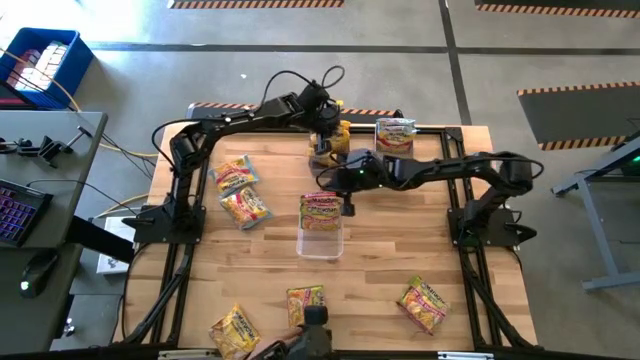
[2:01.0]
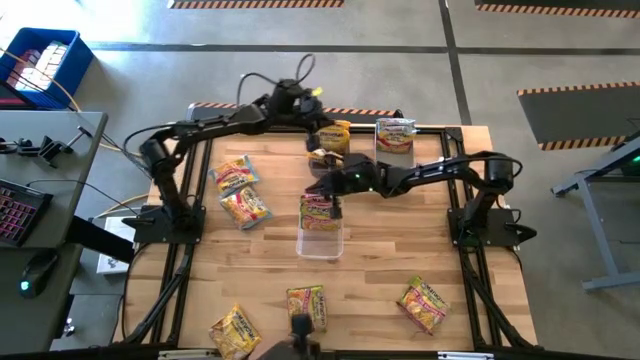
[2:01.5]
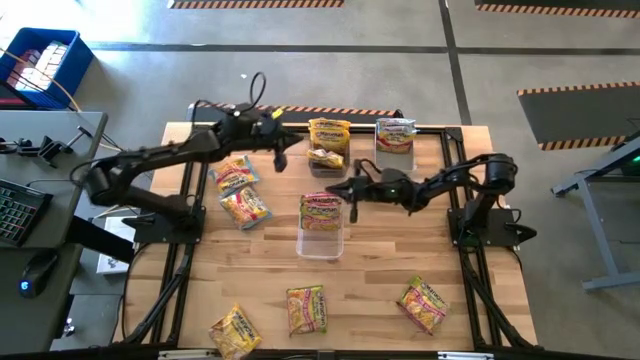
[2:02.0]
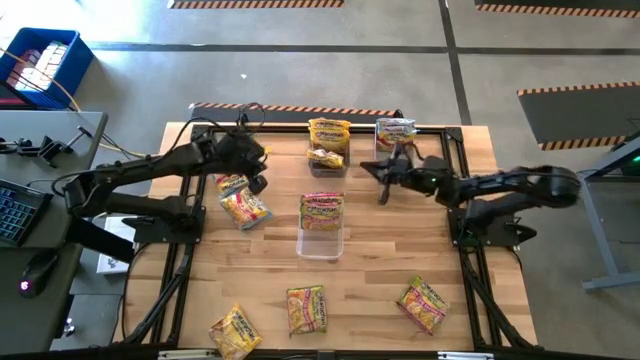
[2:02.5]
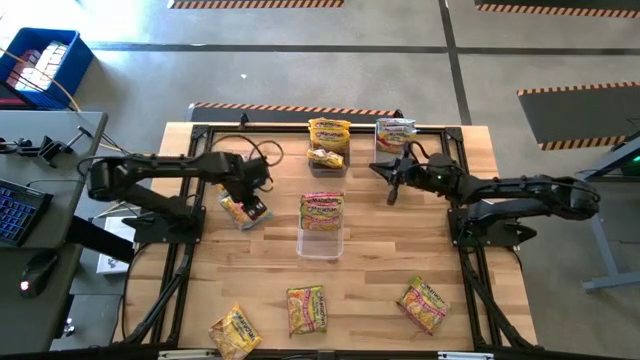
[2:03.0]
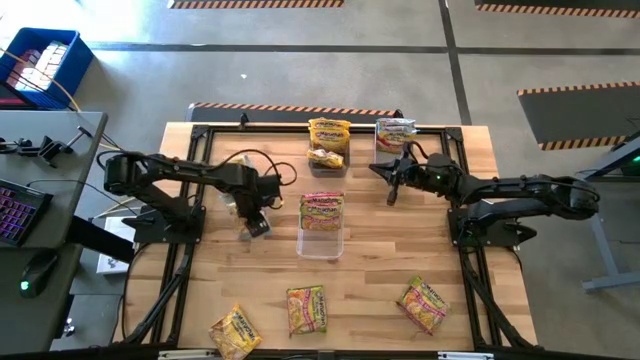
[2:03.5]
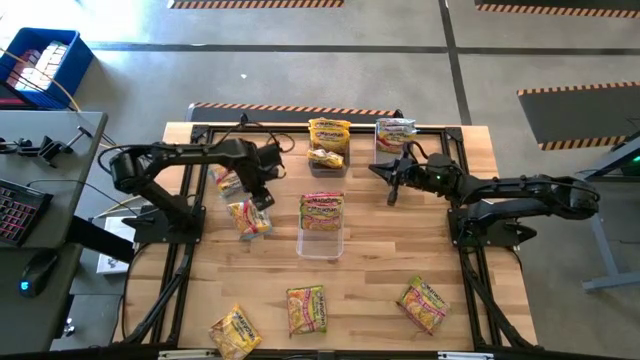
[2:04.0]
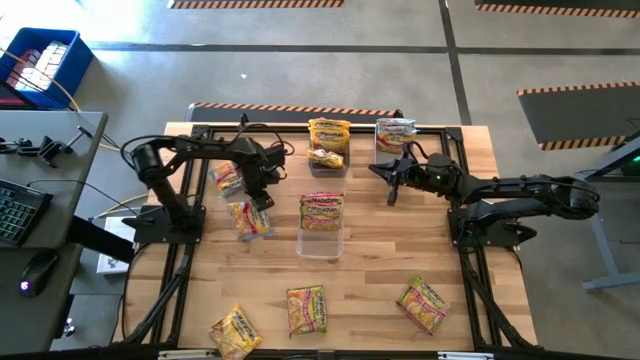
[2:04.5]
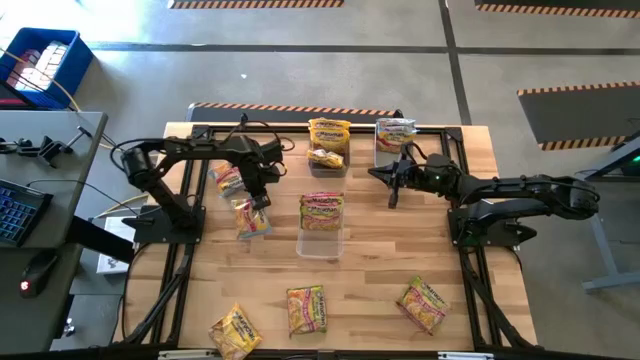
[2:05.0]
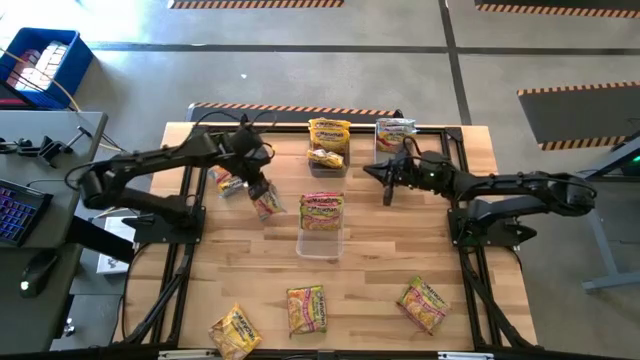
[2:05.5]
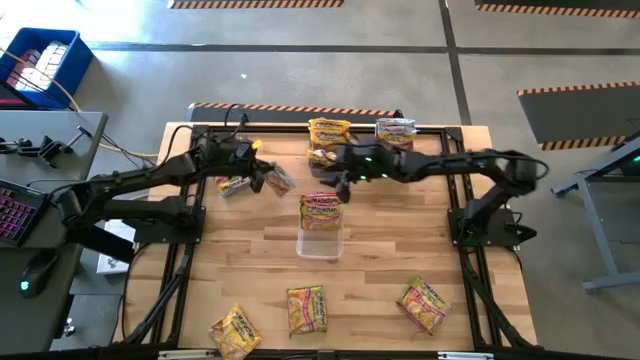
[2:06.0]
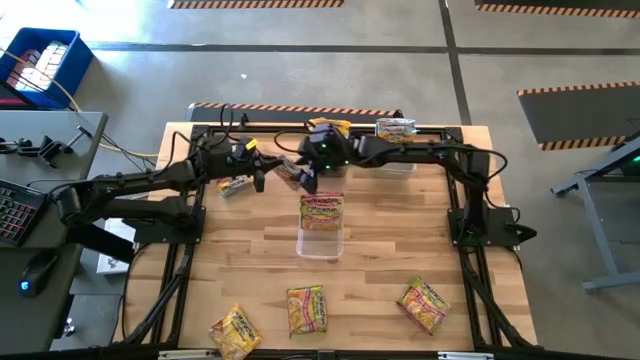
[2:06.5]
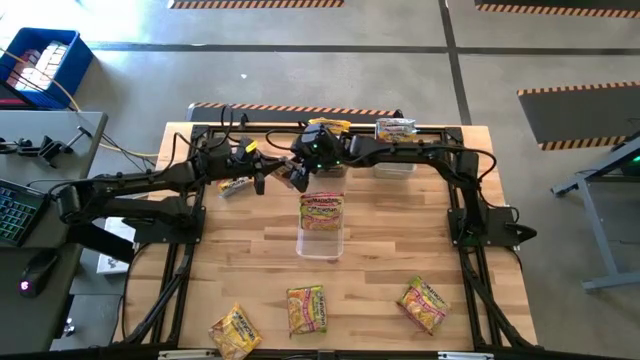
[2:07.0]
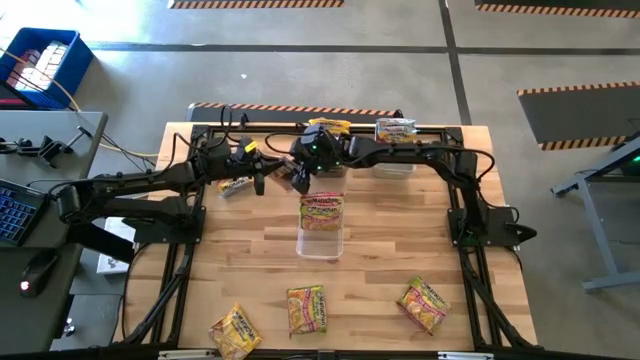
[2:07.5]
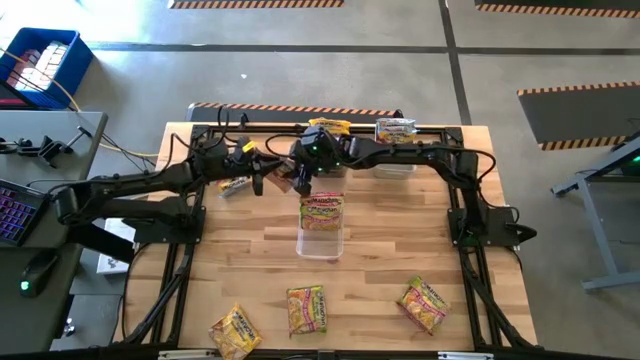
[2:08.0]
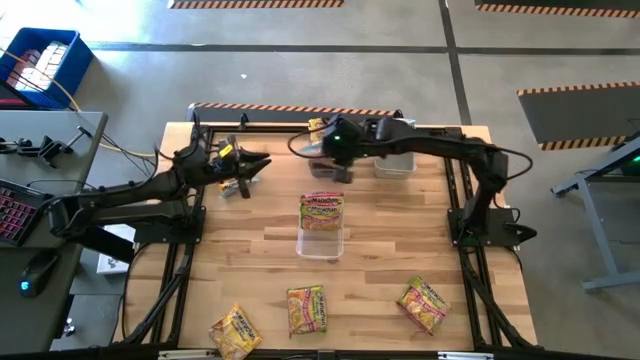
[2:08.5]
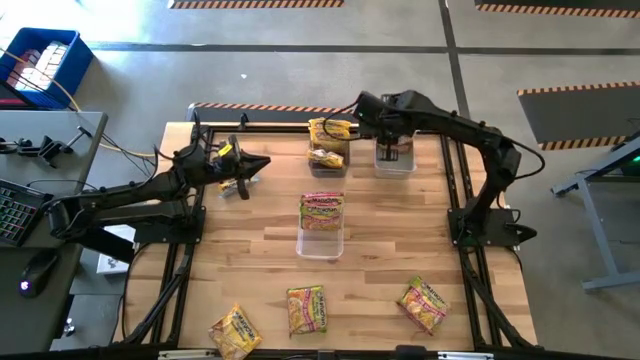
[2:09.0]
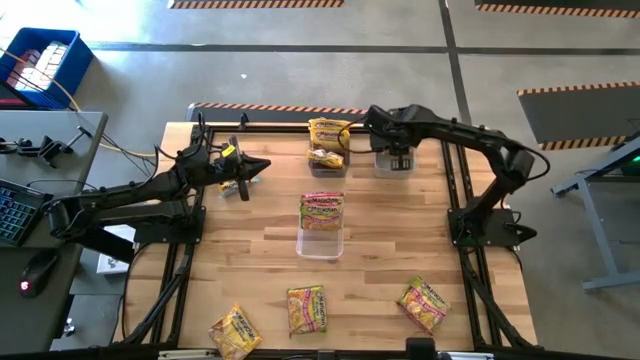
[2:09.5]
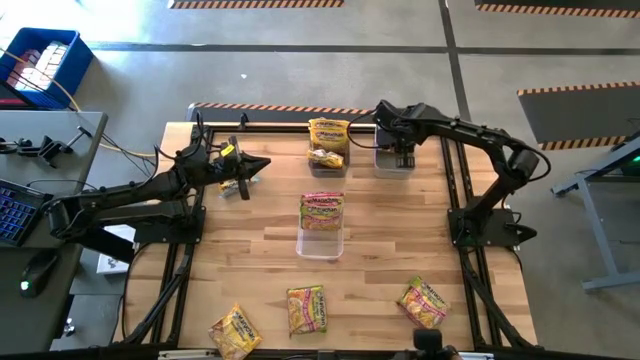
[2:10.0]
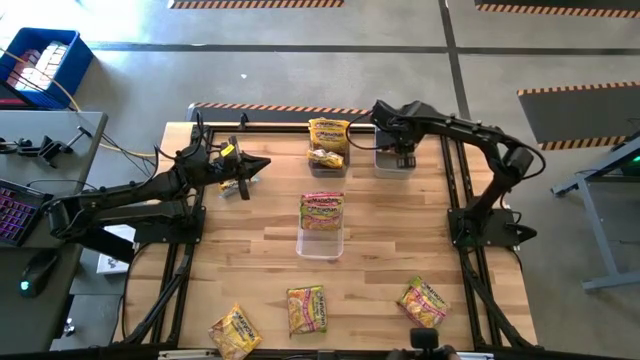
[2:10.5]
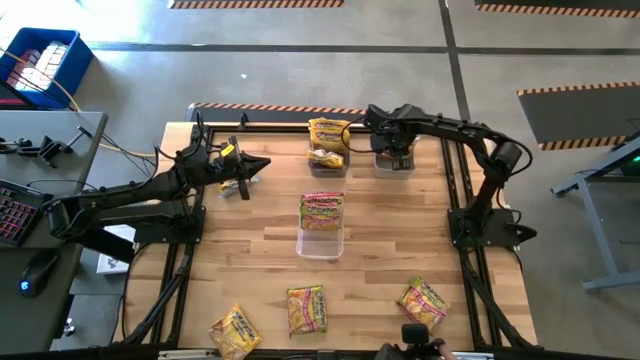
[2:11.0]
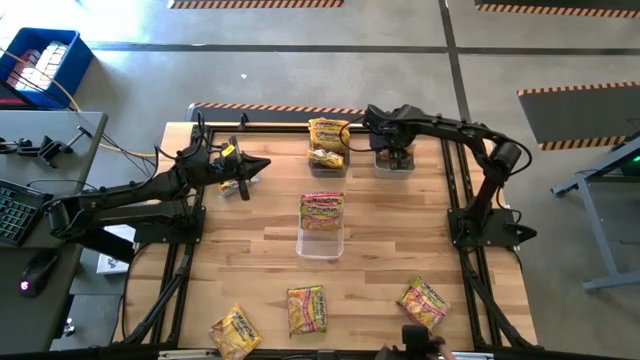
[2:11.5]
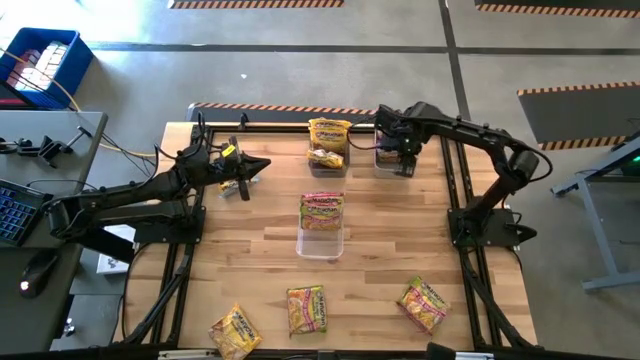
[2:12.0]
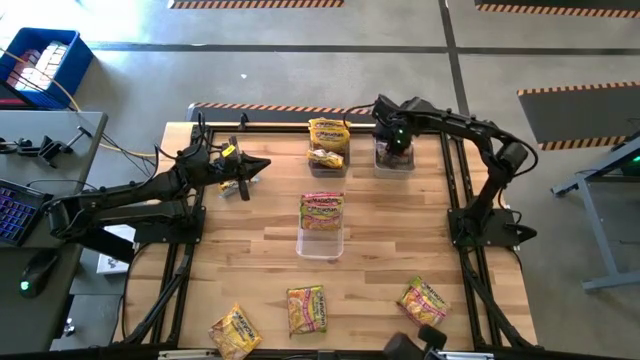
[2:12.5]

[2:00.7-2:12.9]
Task: Sort Maruchan noodles
Put the blue noodle pack into the white bin

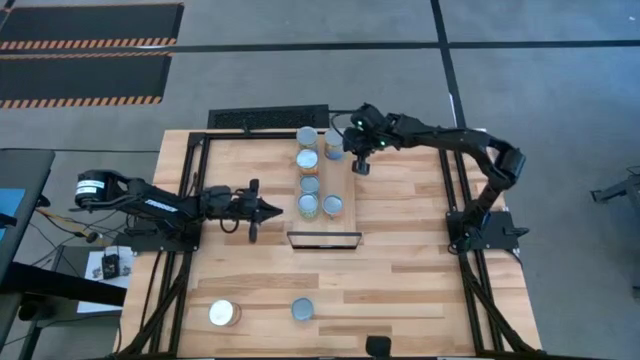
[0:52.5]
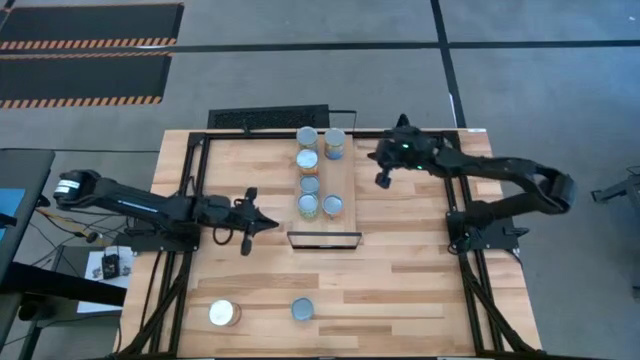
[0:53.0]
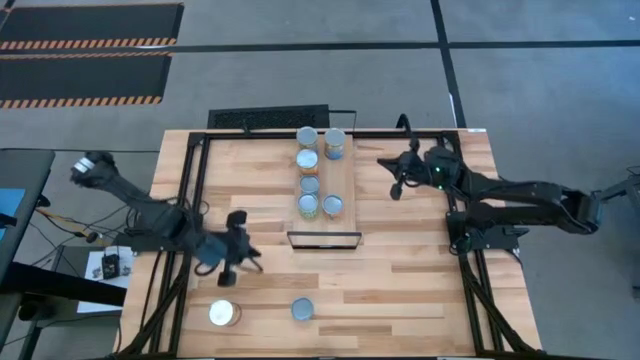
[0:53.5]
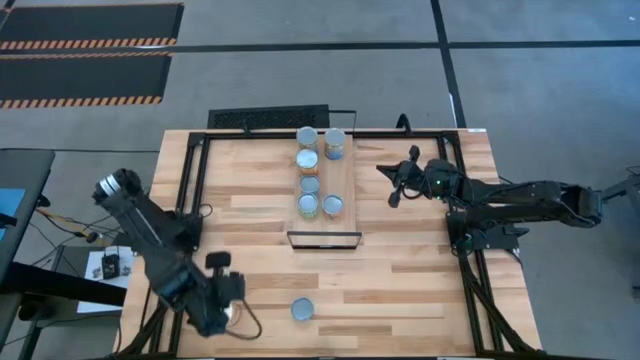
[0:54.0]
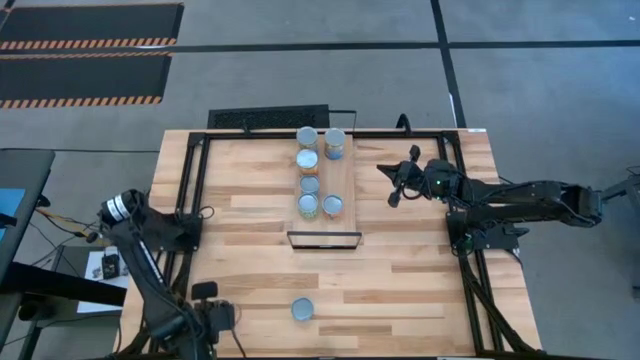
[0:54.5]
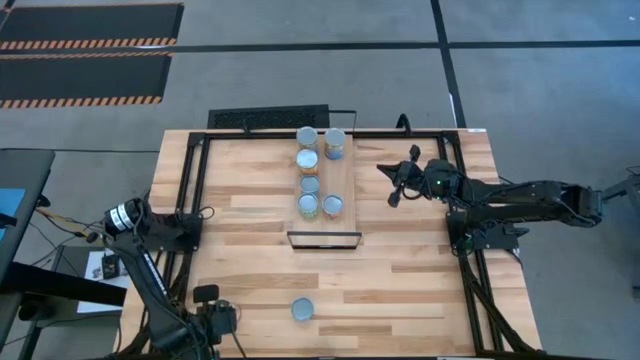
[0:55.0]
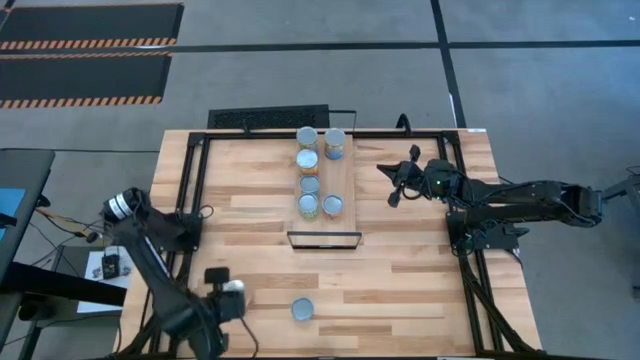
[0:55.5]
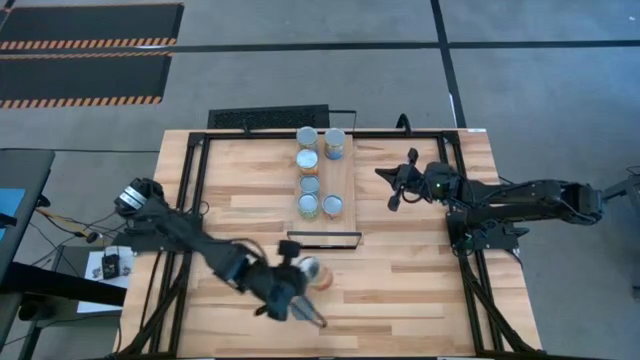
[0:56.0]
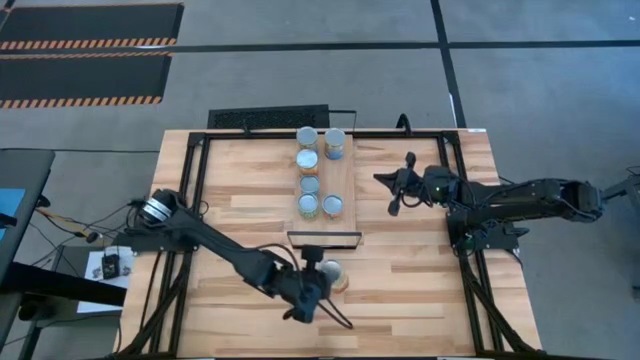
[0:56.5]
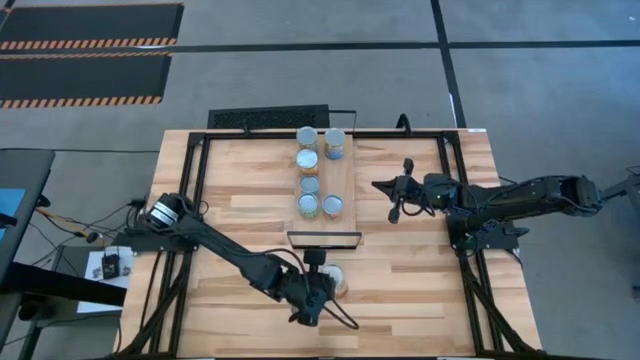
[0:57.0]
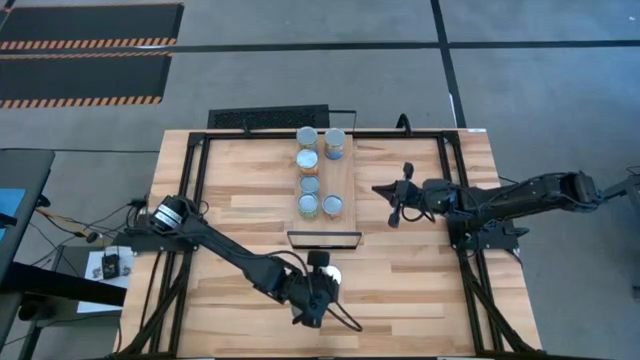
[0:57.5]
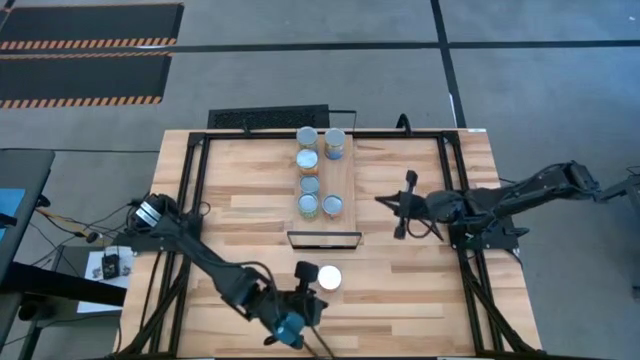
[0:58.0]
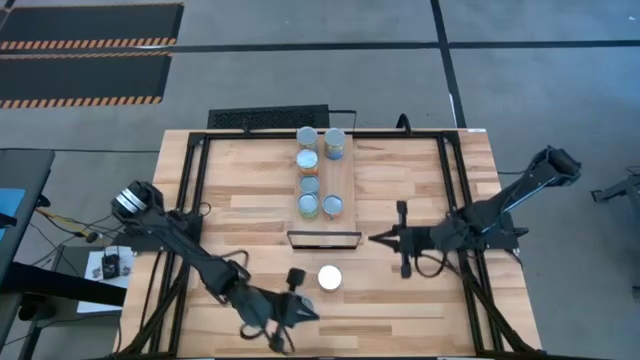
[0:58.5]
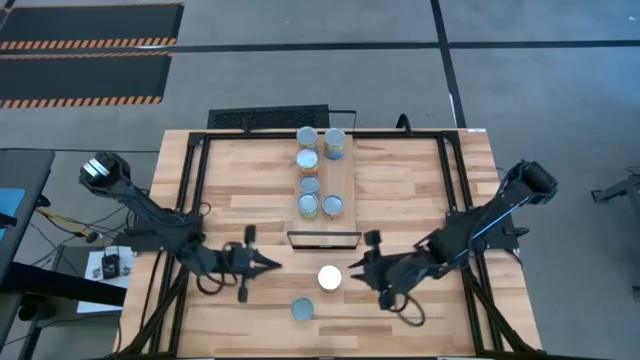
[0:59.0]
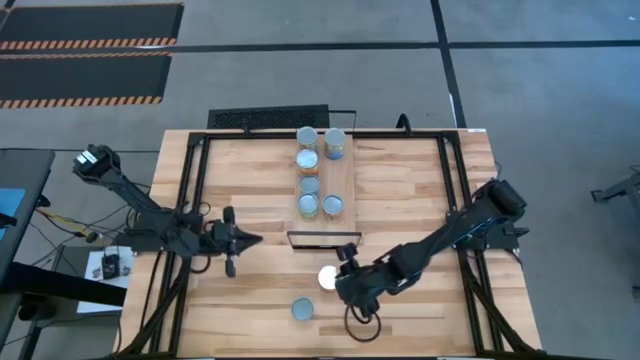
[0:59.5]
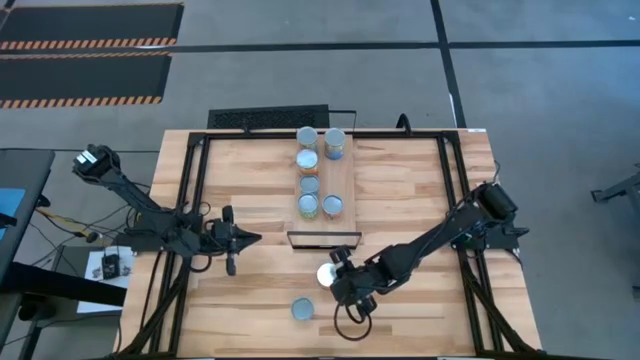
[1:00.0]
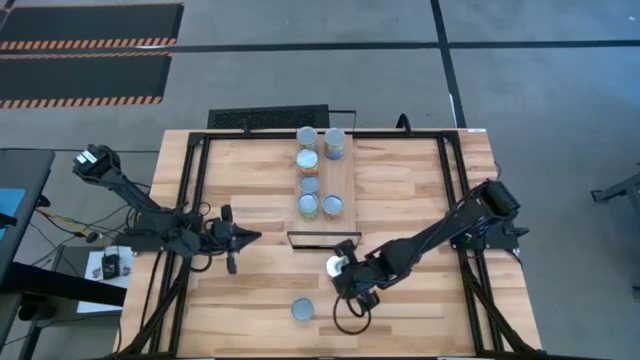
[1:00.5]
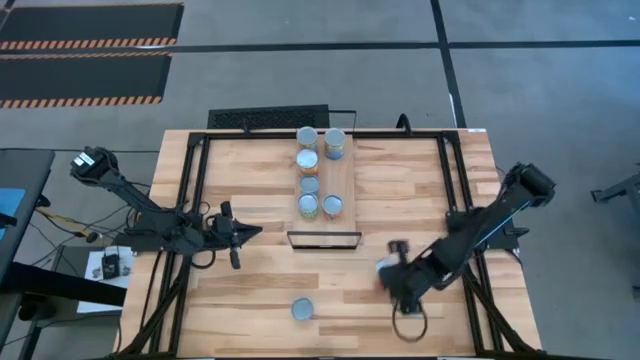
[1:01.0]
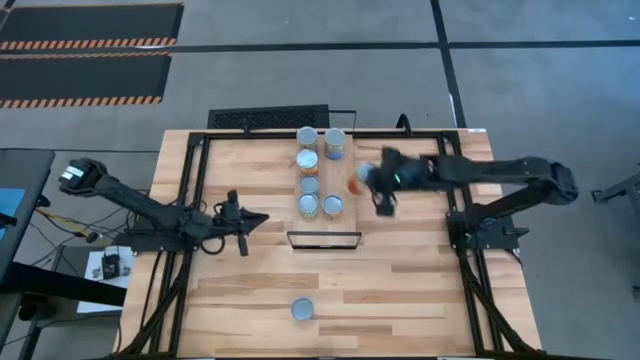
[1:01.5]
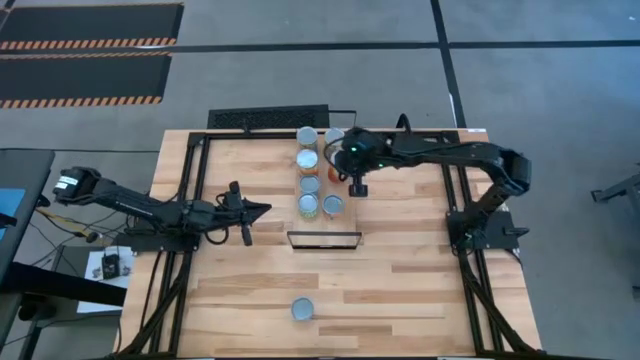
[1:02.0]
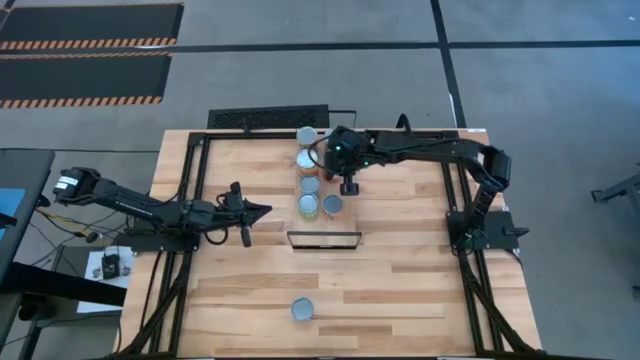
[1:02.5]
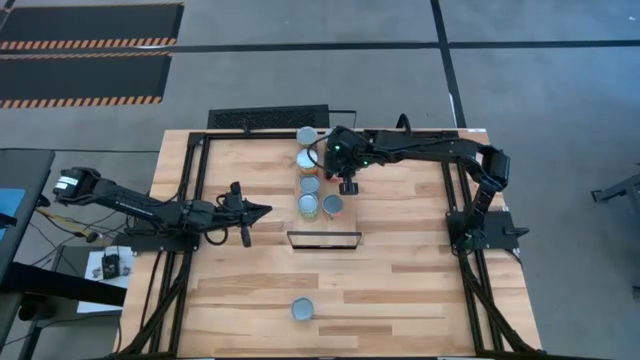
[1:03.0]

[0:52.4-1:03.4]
Task: Pick and place cans onto a shelf
Put the canned corn on the shelf aligned with the other canned corn
